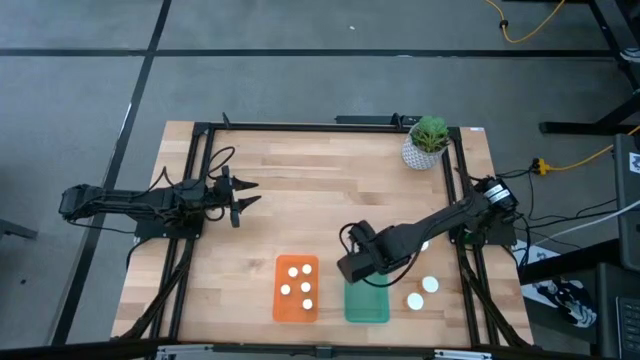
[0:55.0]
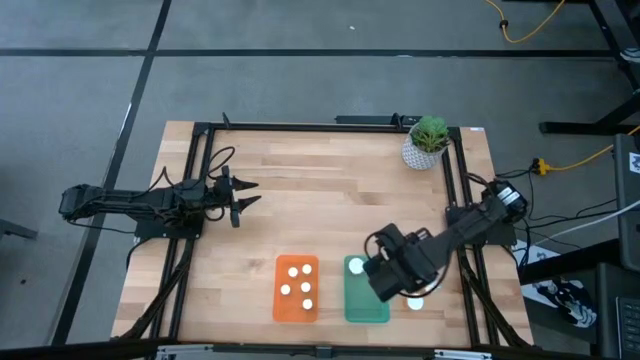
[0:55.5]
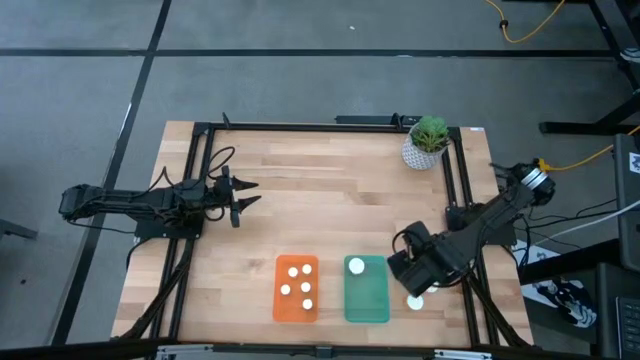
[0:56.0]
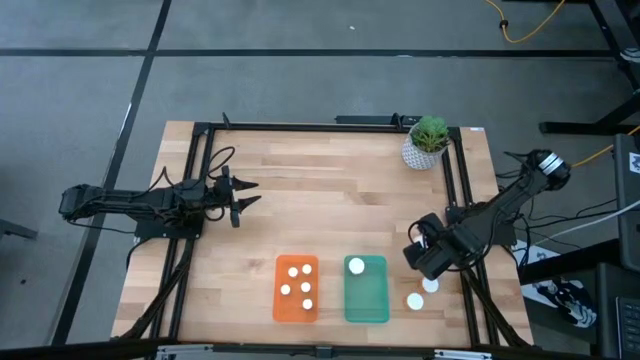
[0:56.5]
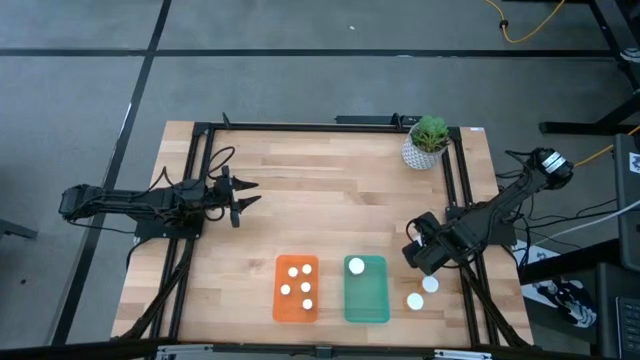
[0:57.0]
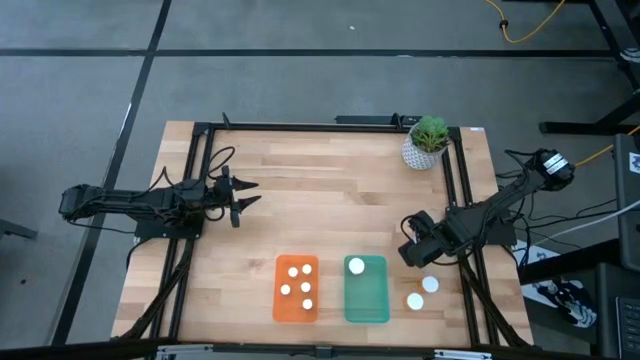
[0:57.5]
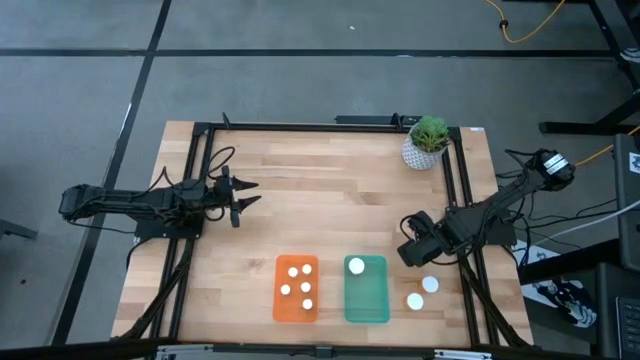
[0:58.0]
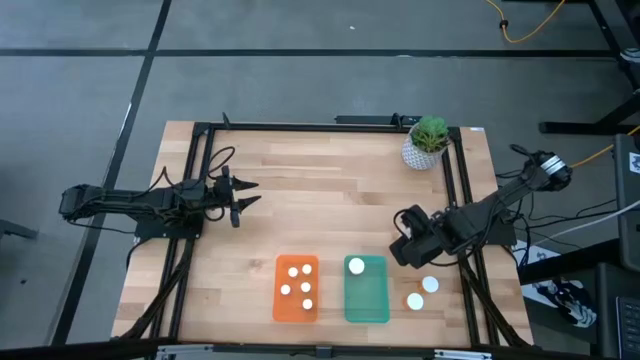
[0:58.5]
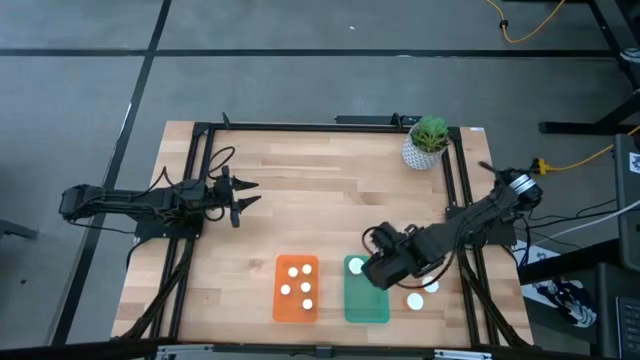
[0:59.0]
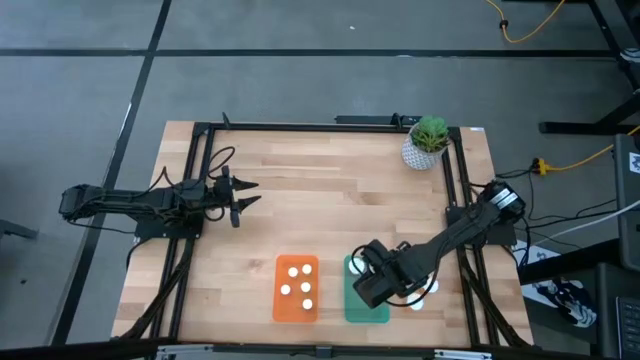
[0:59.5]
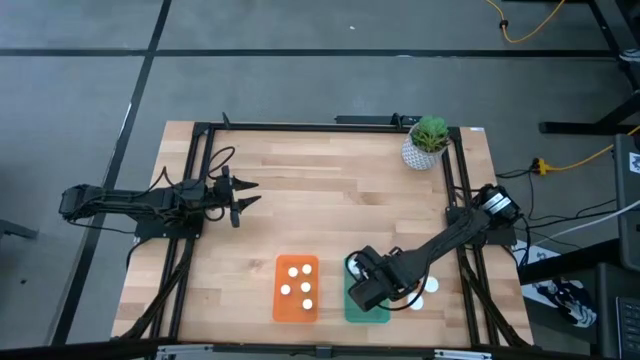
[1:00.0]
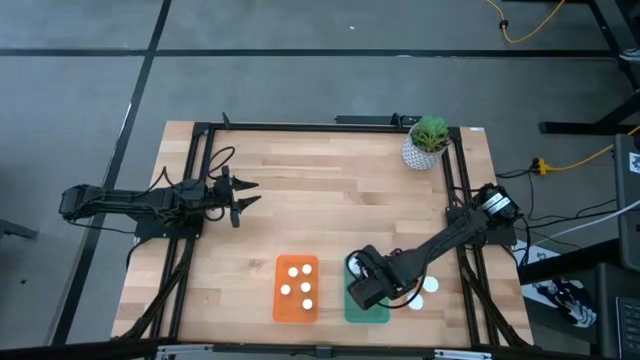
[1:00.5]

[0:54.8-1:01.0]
Task: Pick and place medicine bottles into bin by pill shape (circle, oval)
Put the top big orange pill bottle into the green bin

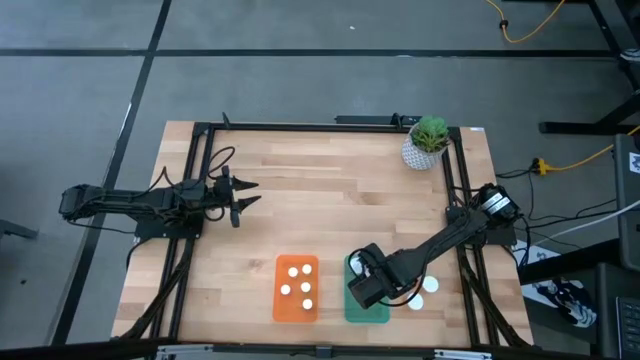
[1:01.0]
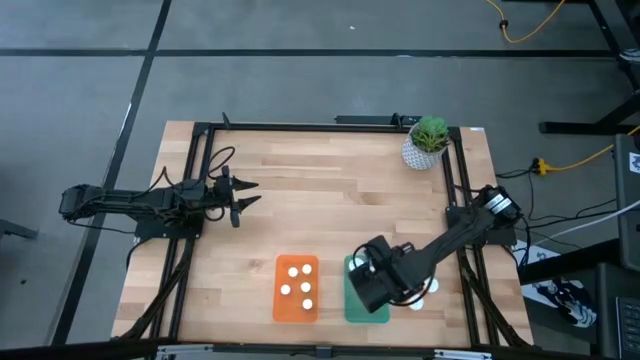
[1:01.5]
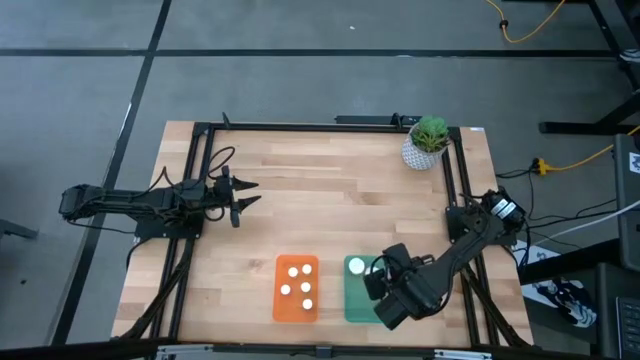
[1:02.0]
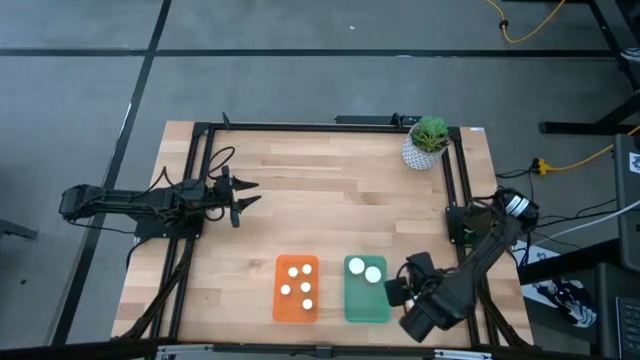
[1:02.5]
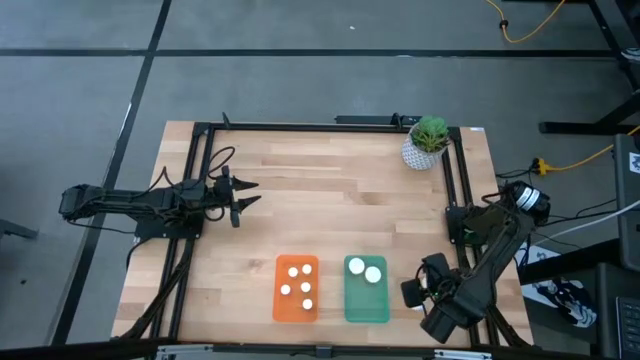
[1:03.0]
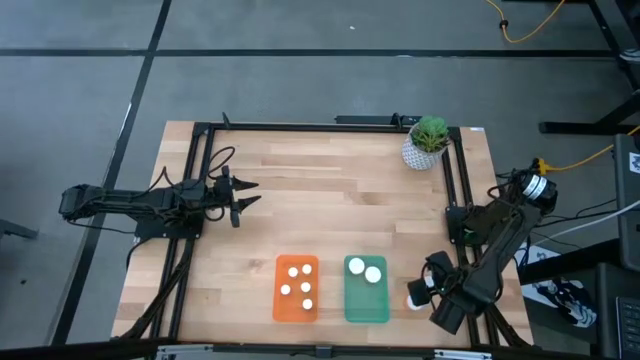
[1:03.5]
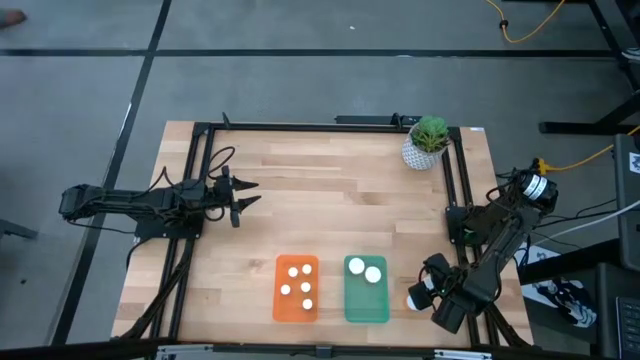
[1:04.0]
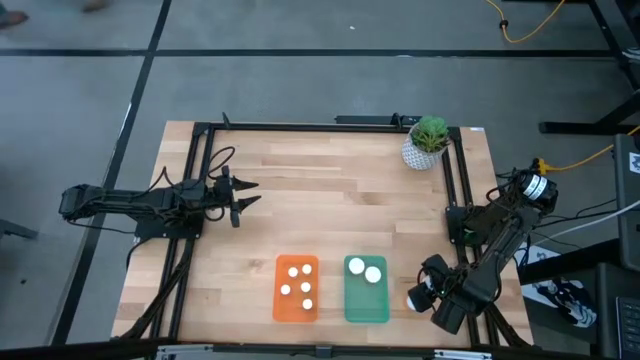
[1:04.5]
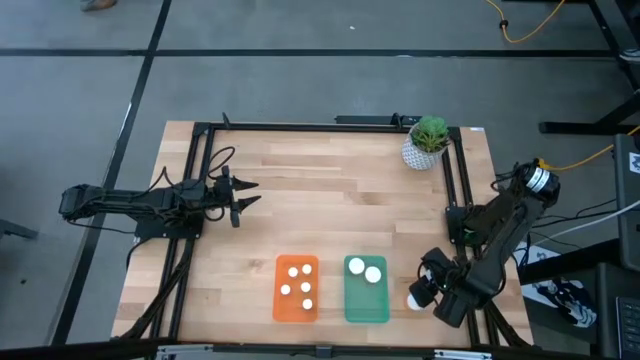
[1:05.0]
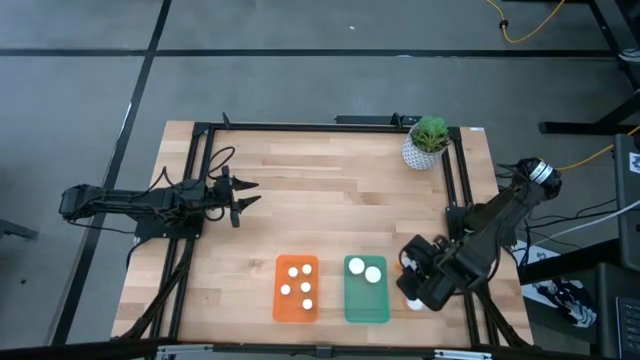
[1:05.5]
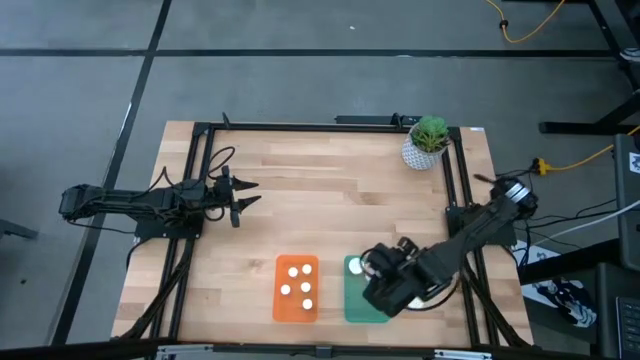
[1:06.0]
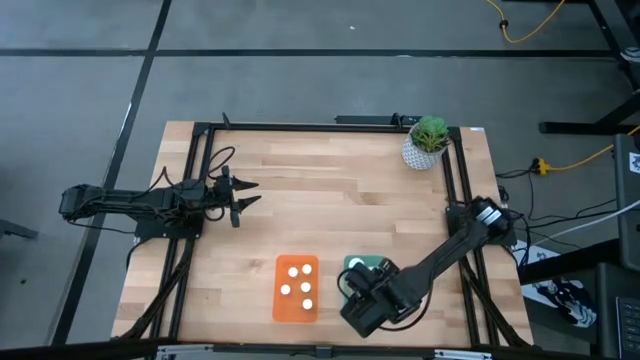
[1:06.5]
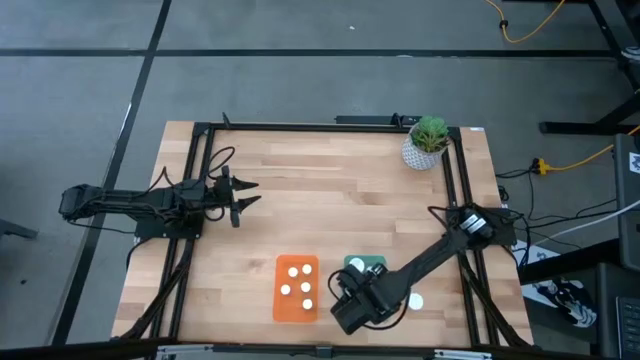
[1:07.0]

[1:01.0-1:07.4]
Put the top big orange pill bottle into the green bin

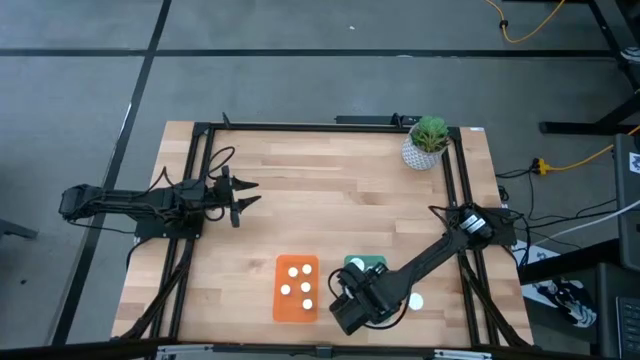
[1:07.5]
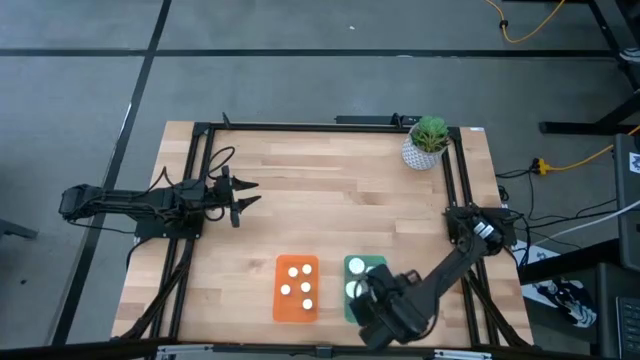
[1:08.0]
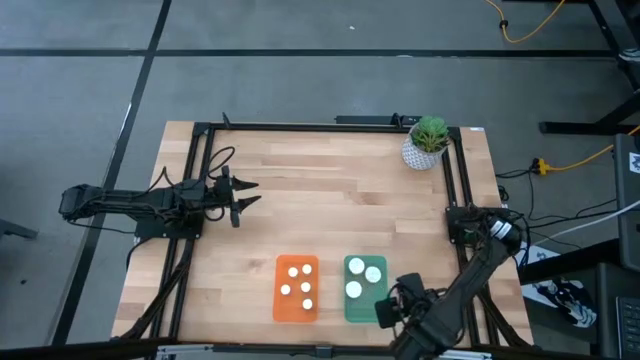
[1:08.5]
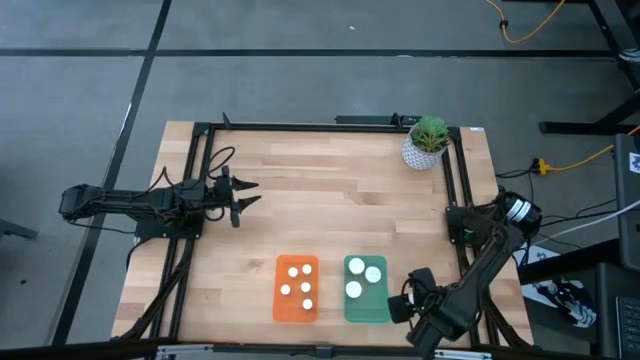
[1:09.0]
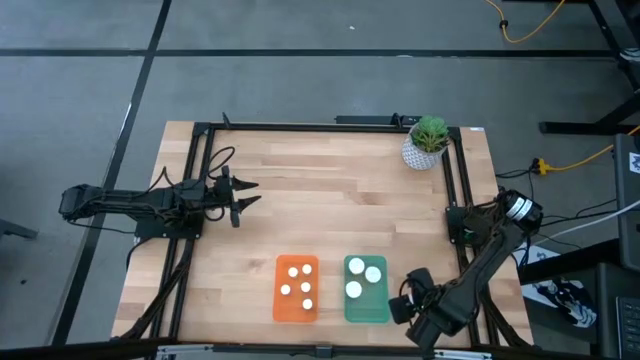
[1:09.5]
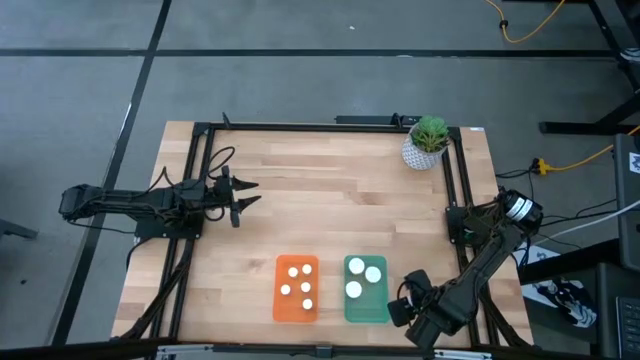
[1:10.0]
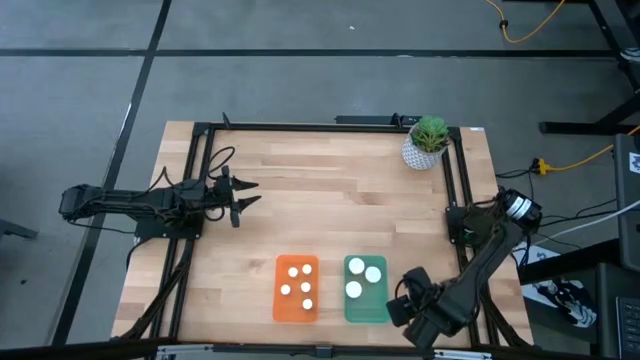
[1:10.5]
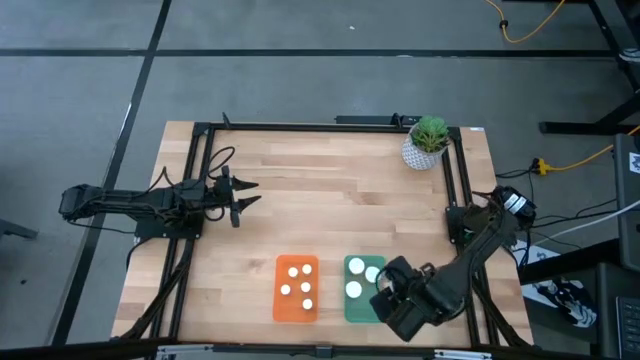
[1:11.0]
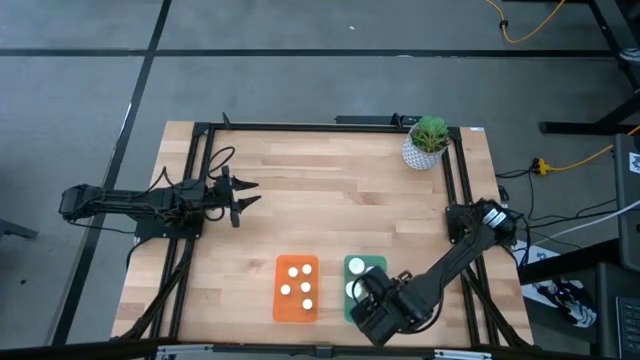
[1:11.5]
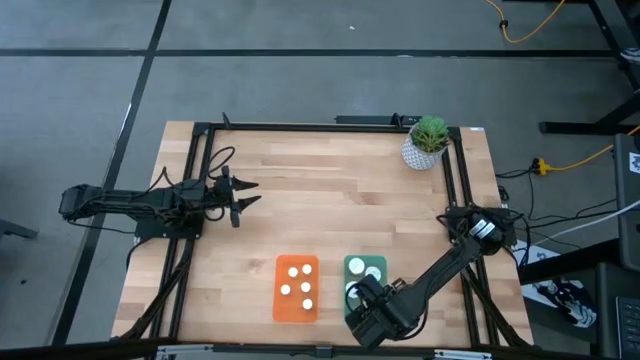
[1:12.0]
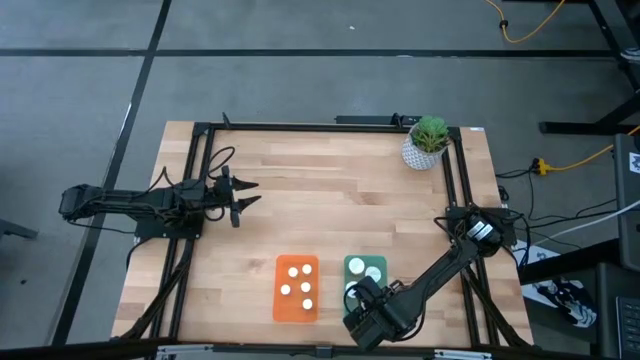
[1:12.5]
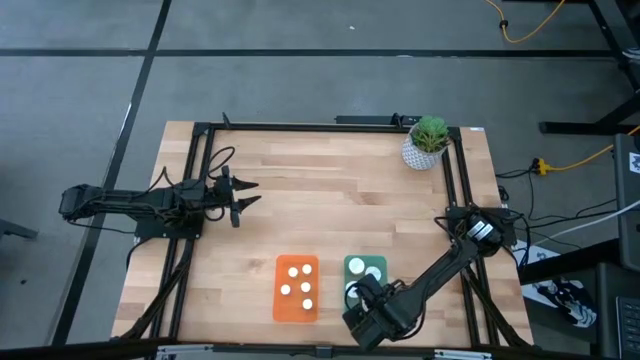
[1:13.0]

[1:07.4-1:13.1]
Put the big orange pill bottle into the green bin

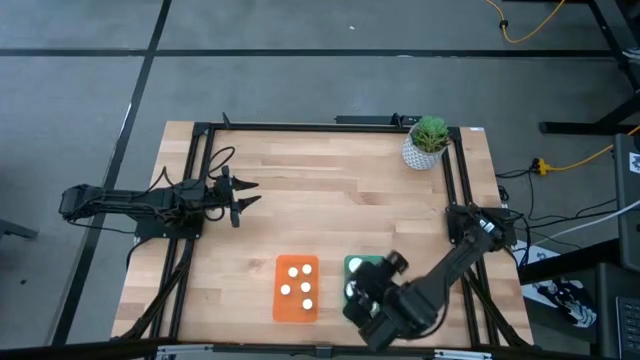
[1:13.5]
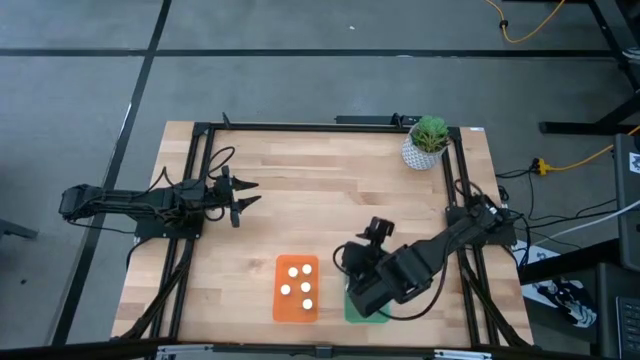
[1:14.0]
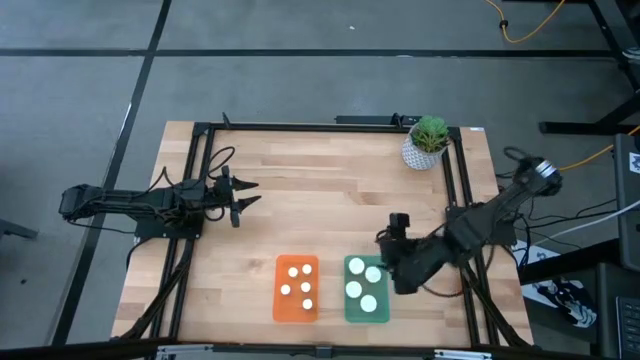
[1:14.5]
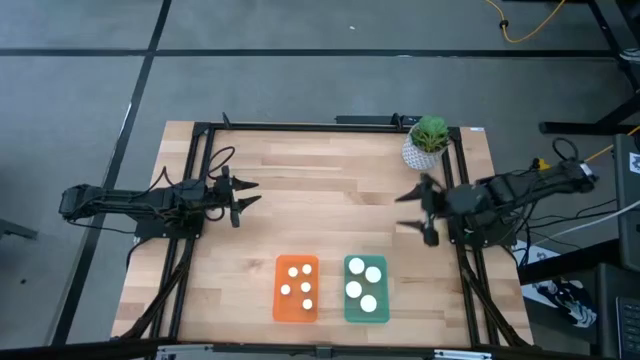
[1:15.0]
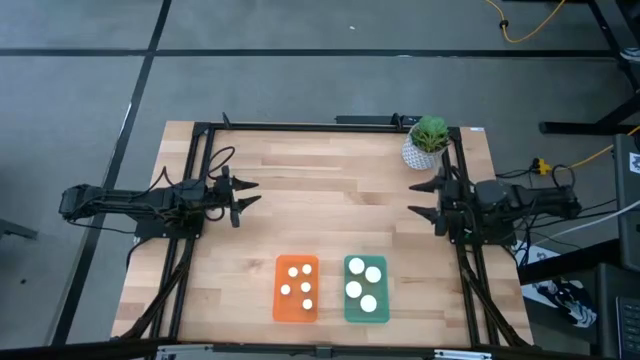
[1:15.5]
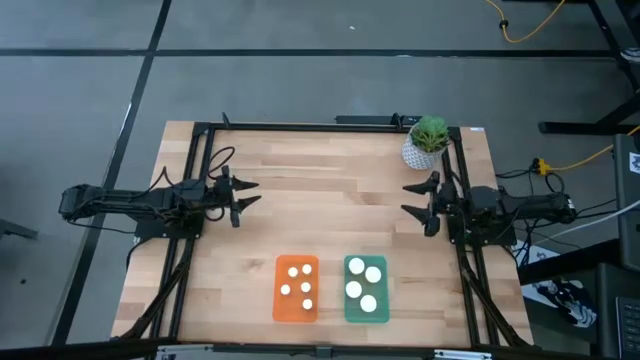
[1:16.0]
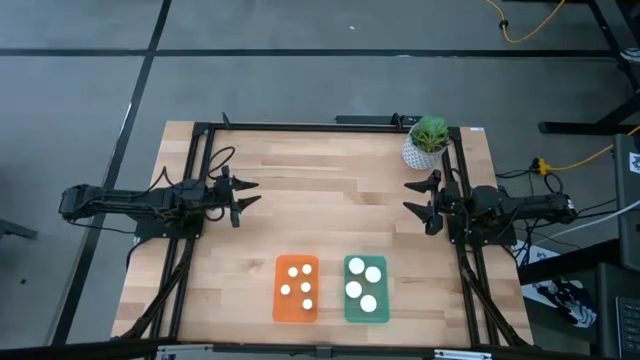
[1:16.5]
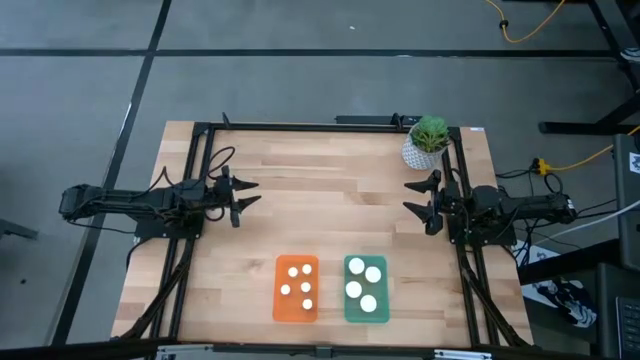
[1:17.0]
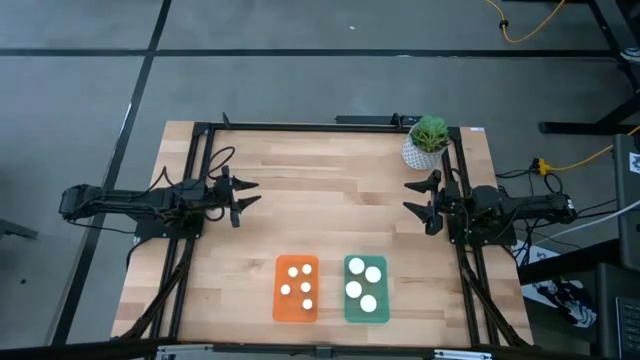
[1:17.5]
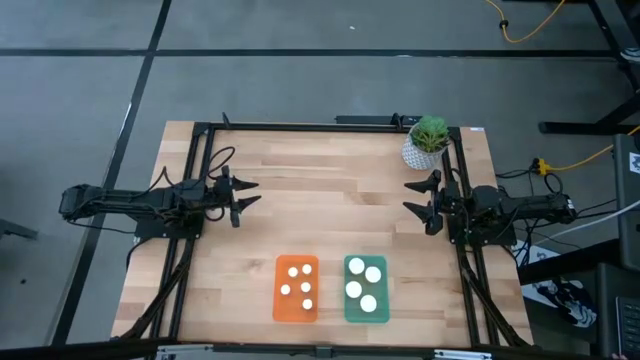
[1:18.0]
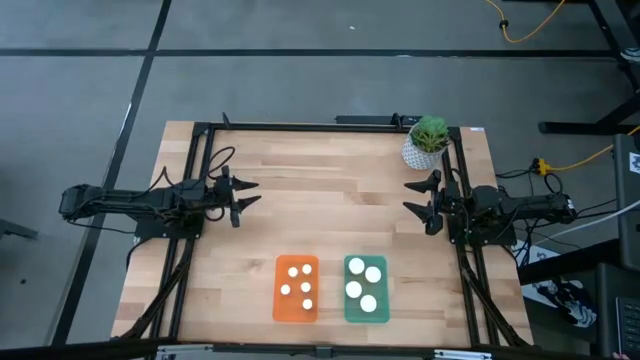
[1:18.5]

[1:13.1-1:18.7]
Return to Home Position
